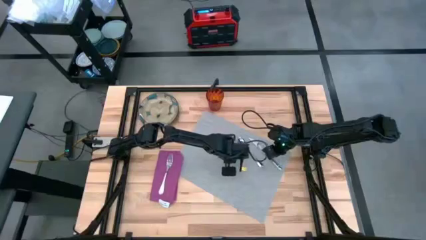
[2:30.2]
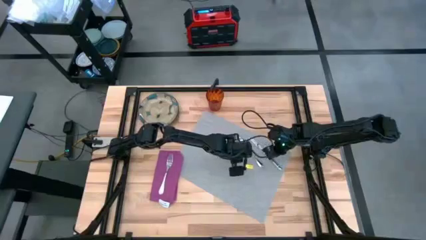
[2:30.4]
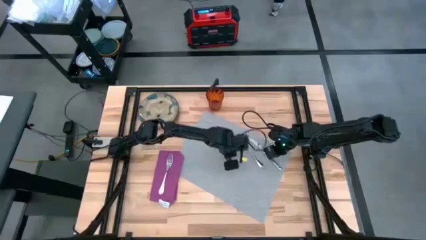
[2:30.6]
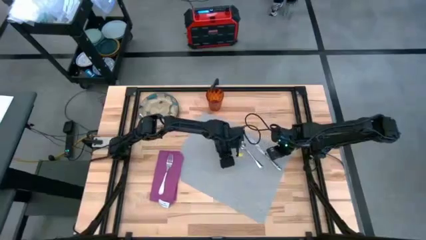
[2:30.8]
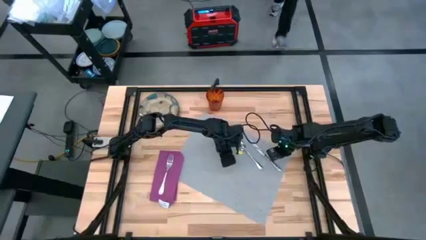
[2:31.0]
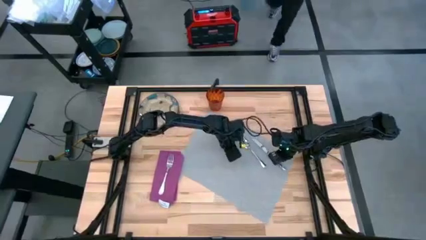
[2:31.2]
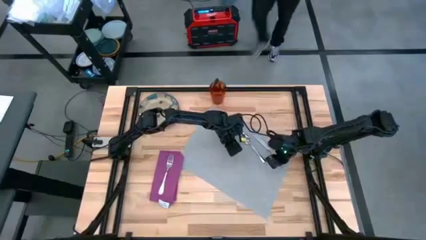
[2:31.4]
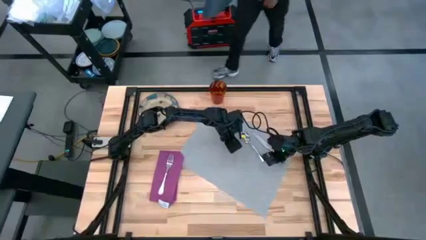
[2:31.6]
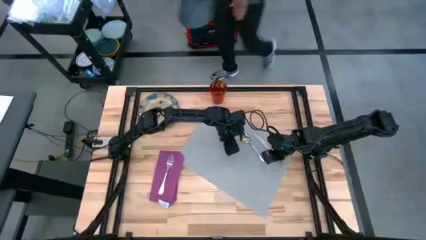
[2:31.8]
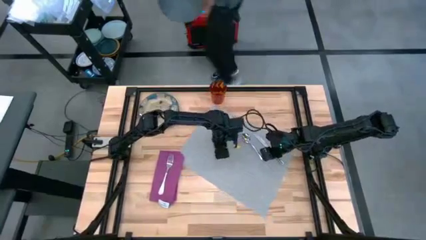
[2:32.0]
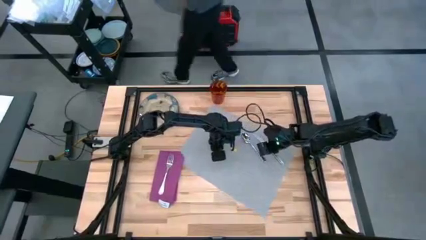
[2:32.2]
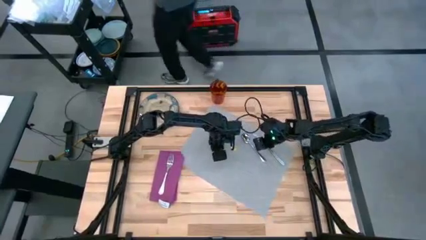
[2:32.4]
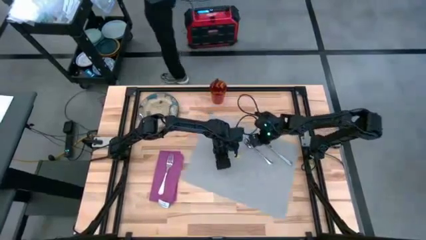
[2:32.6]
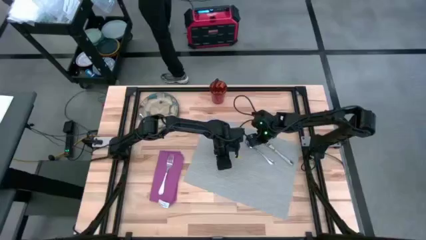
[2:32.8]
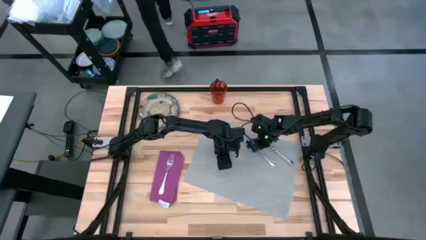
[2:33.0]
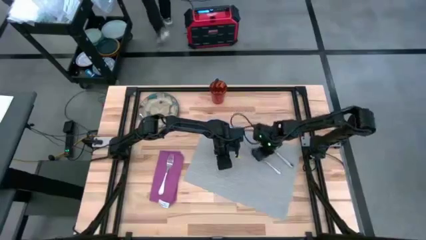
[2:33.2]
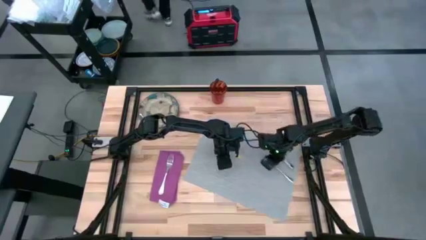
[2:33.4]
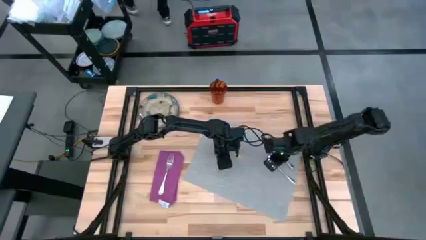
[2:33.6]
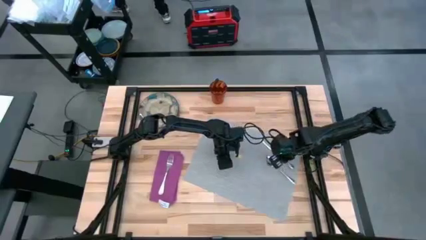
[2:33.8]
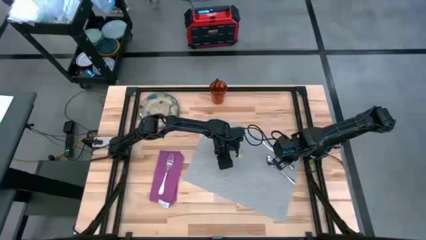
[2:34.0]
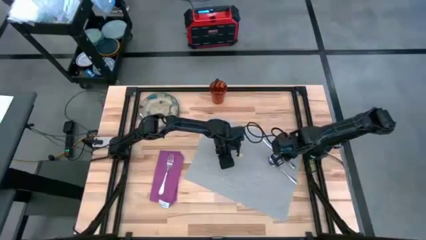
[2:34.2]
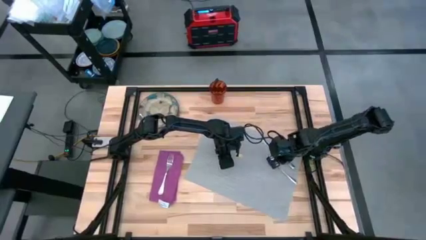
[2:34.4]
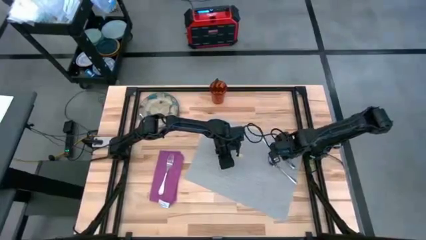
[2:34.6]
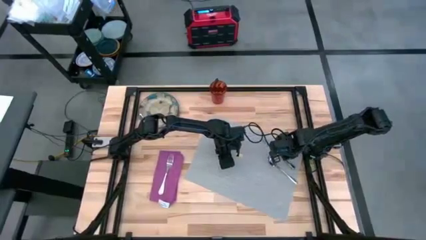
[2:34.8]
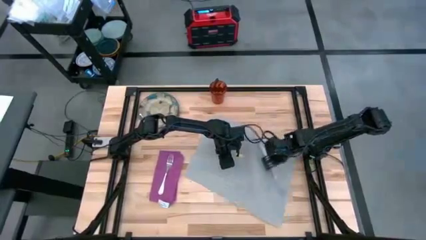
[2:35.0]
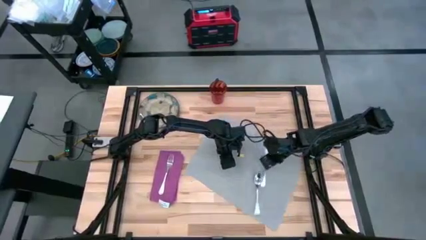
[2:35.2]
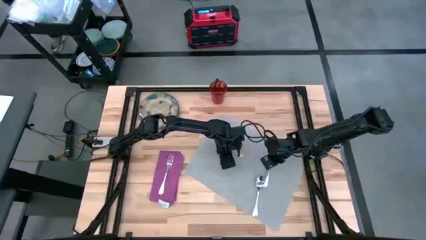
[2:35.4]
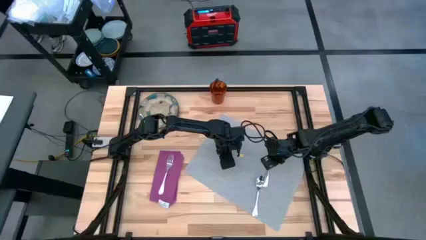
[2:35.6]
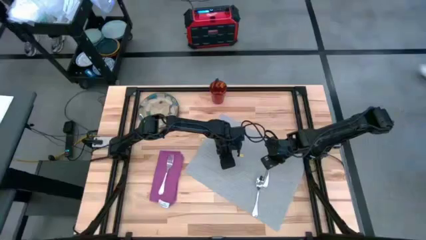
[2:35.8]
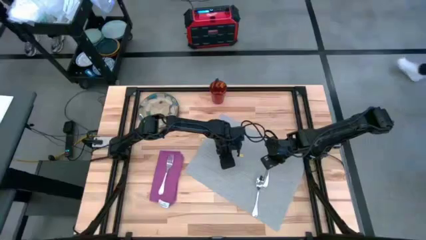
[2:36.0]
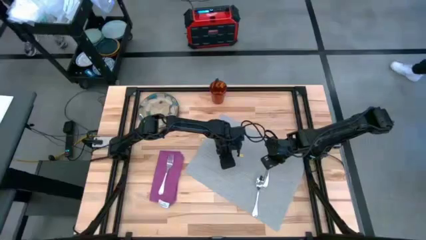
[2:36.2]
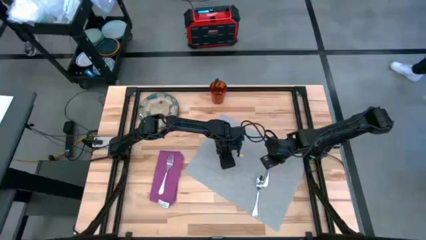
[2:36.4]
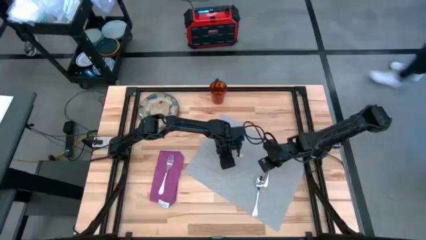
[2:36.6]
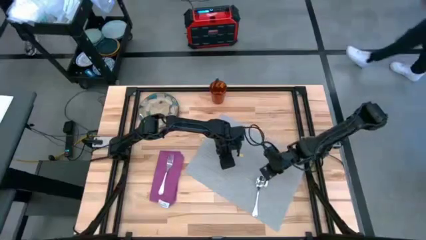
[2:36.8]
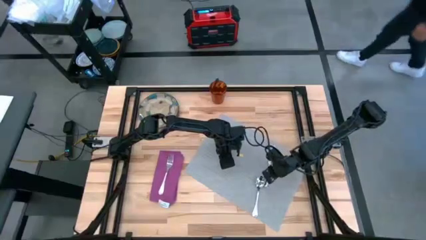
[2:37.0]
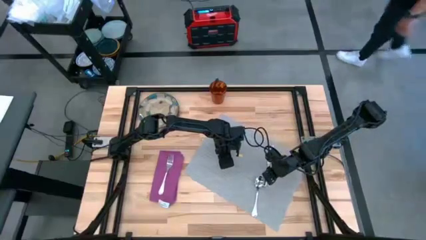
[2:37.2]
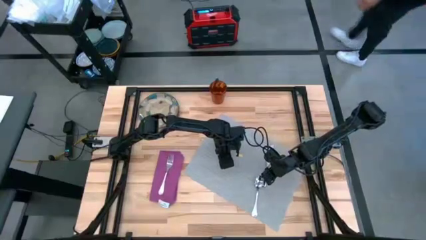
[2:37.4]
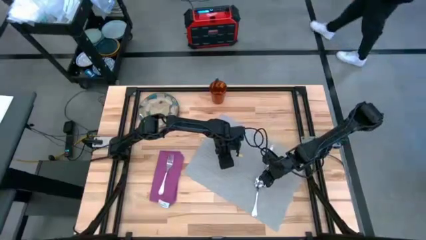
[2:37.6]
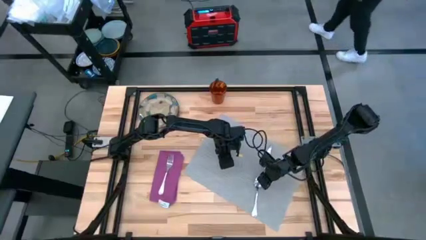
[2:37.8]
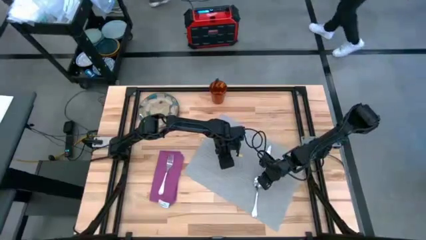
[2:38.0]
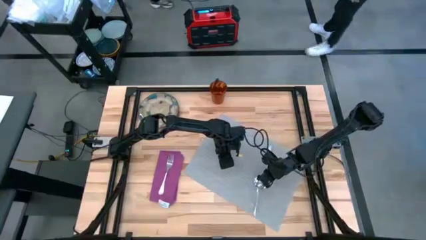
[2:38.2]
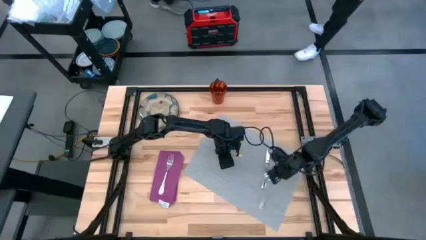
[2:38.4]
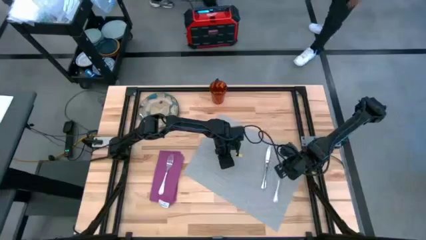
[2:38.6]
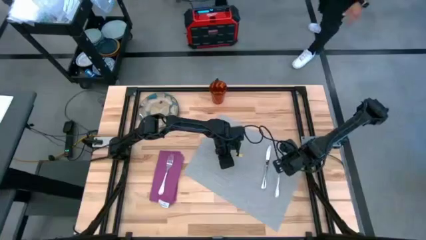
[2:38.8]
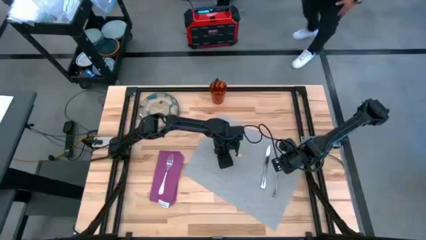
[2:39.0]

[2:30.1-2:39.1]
Task: Set table place
Adjust the spoon on top the table mat

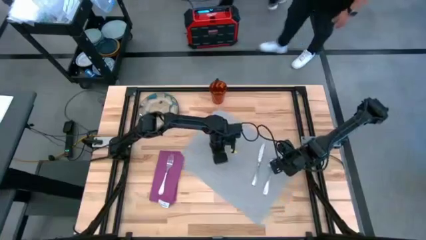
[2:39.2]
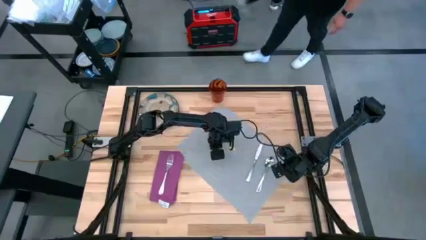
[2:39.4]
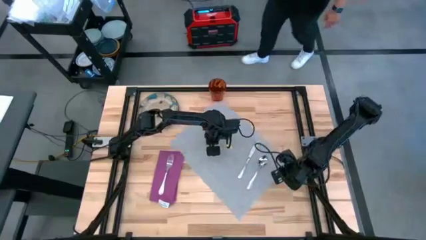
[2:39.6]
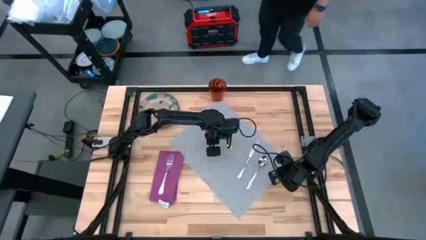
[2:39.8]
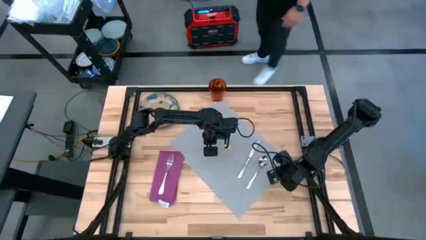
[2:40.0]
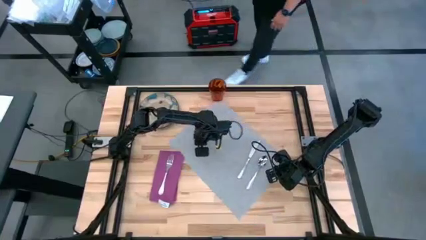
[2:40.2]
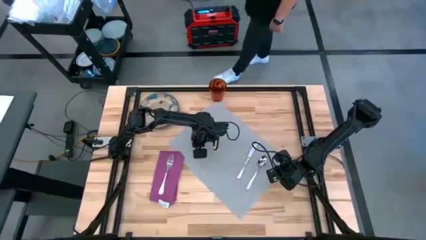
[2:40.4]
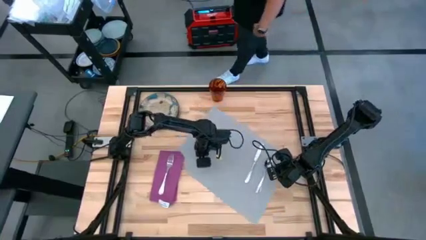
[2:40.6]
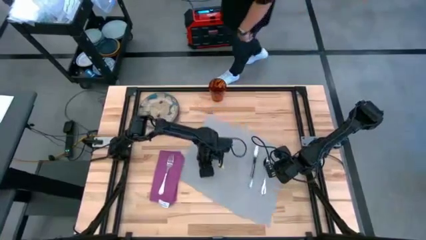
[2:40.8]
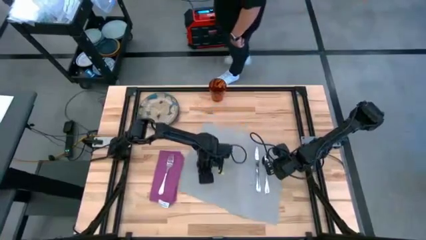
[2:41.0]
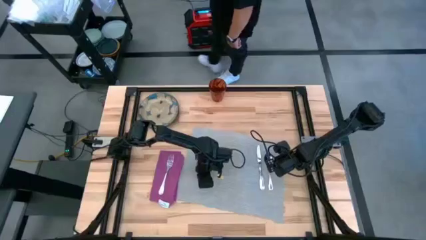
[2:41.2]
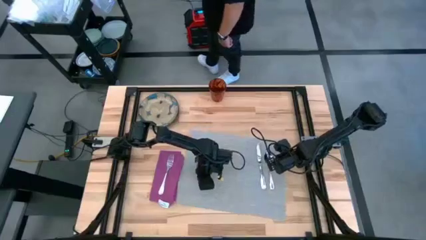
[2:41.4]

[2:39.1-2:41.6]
Adjust the table mat to the center table

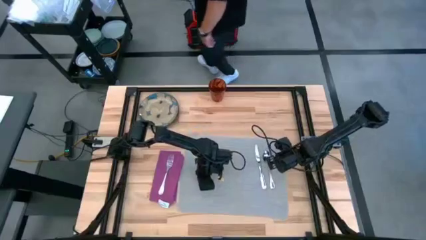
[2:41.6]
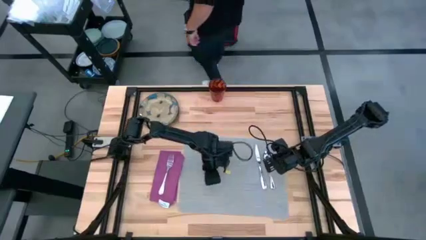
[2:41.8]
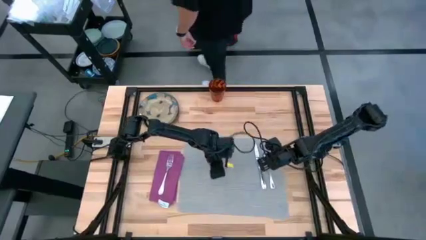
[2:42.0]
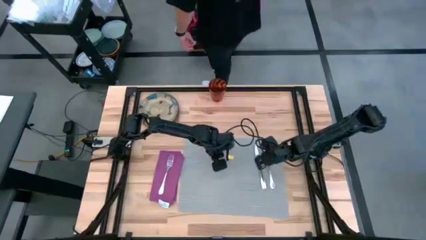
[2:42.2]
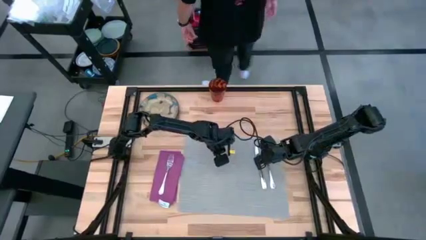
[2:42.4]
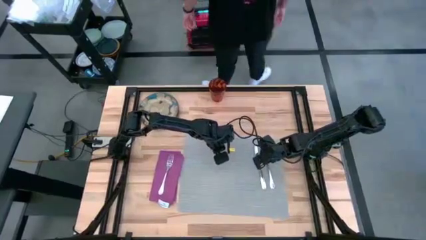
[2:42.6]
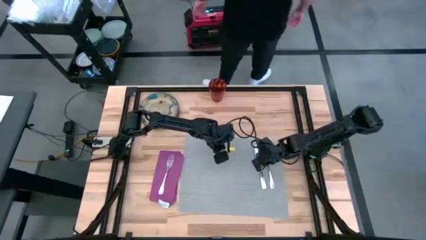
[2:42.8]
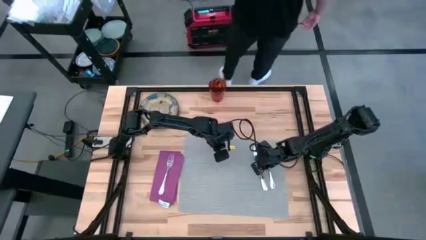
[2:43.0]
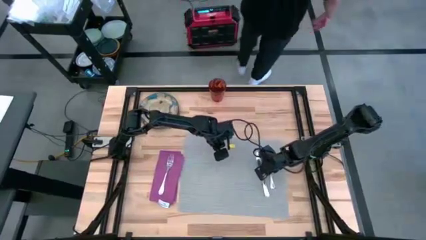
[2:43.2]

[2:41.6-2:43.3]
Adjust the knife on top of the table mat

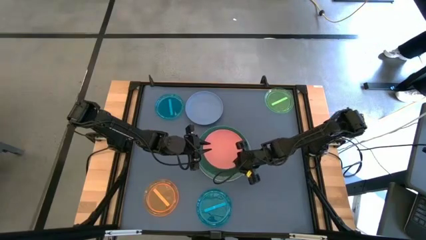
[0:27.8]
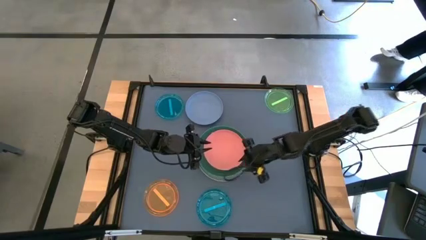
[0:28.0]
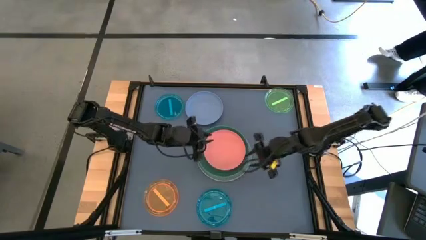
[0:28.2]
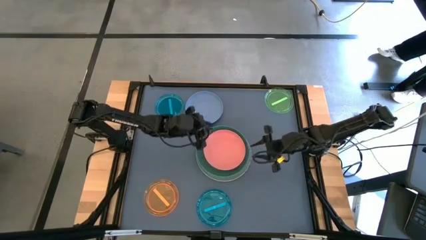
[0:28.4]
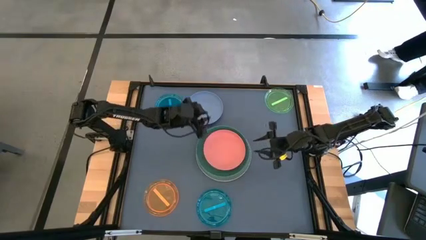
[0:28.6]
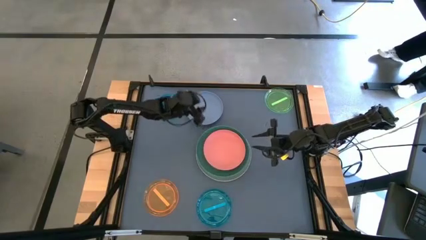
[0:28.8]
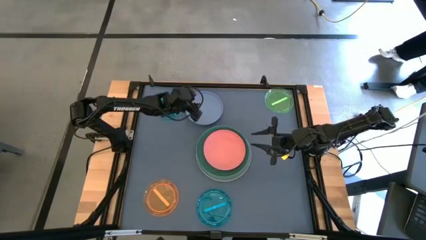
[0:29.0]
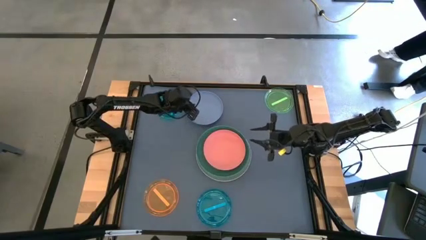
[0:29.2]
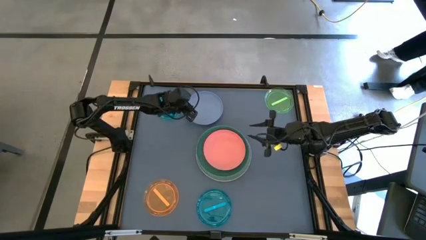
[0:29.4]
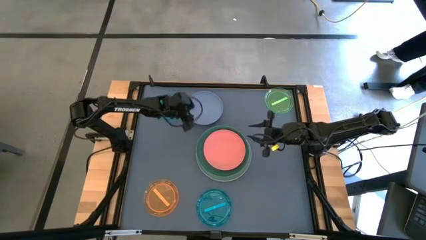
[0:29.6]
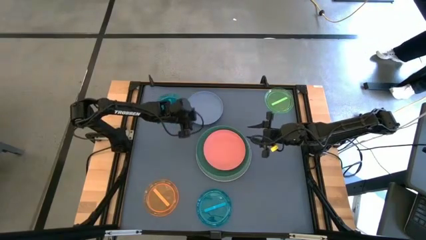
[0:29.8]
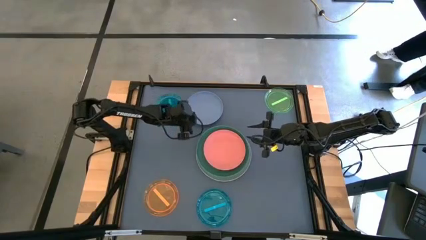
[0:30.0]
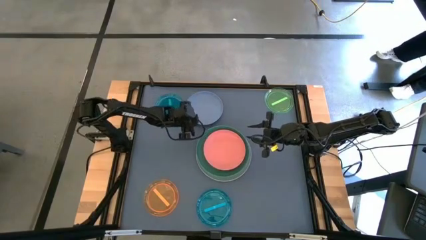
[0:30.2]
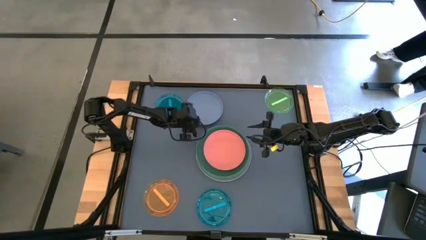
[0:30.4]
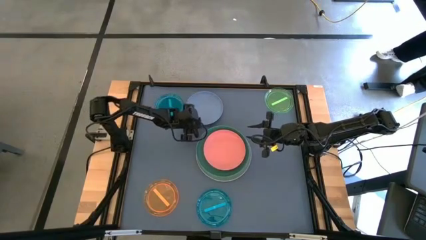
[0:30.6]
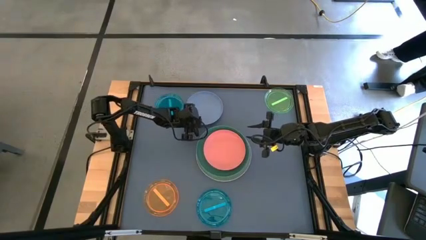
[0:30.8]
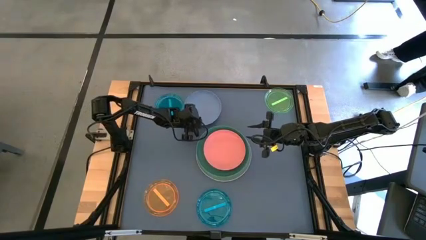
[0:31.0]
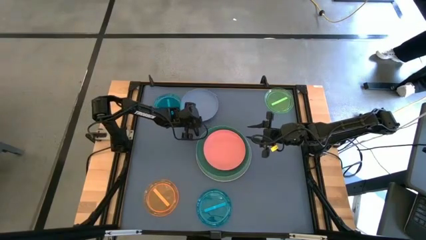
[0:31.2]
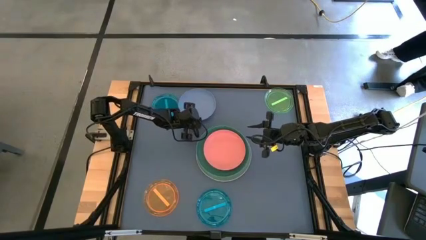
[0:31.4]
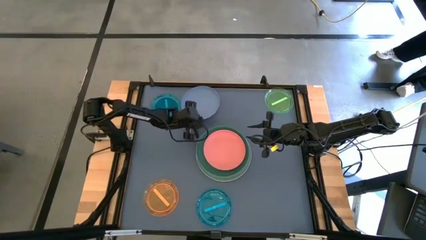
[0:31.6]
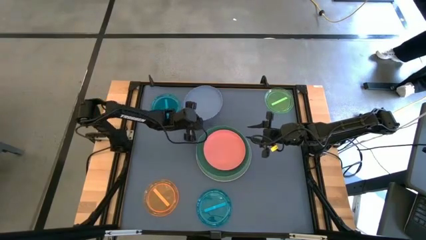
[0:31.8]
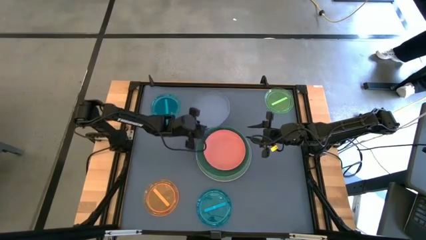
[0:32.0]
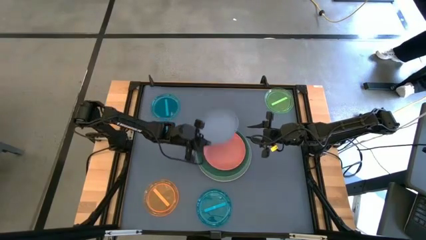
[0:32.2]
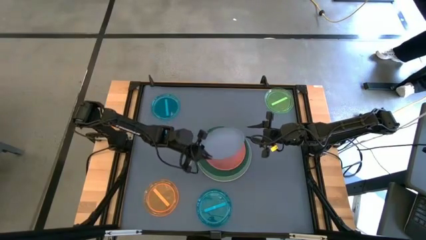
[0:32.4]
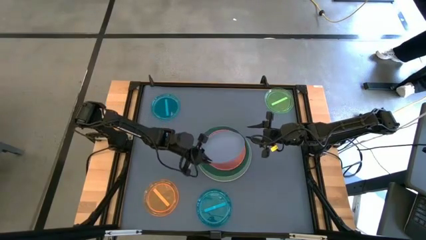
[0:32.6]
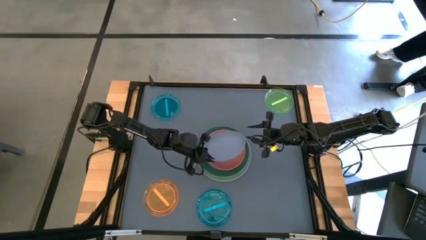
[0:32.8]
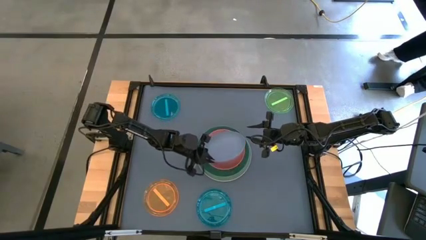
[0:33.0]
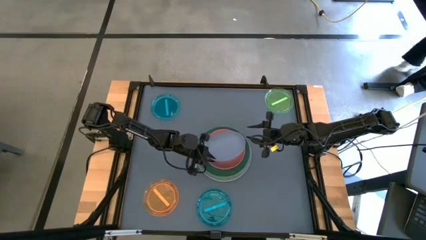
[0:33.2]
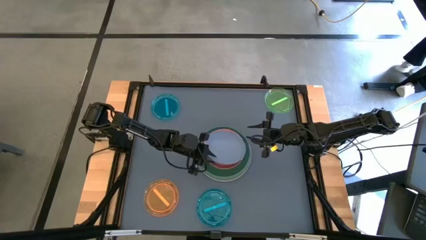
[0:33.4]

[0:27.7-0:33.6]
Task: Stack plastic plates
Stack the blue plate on top of the orange plate
